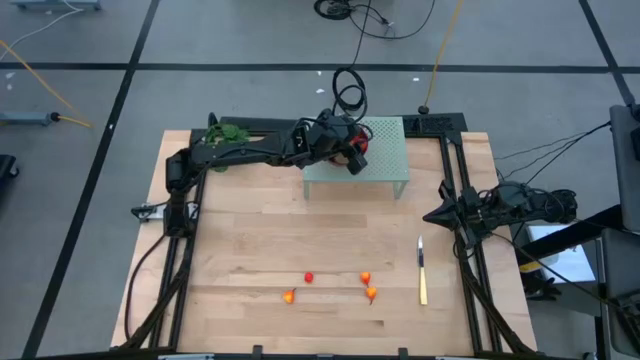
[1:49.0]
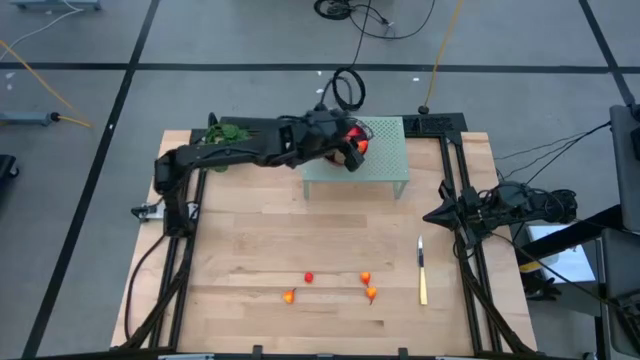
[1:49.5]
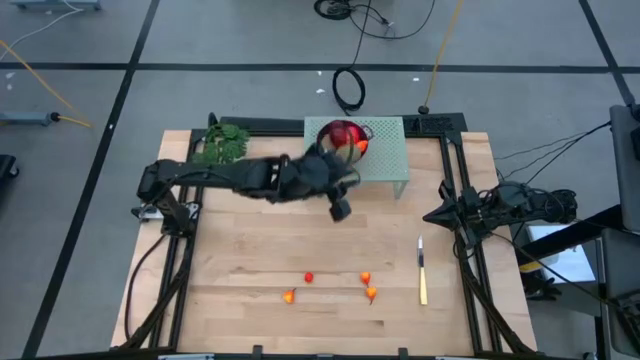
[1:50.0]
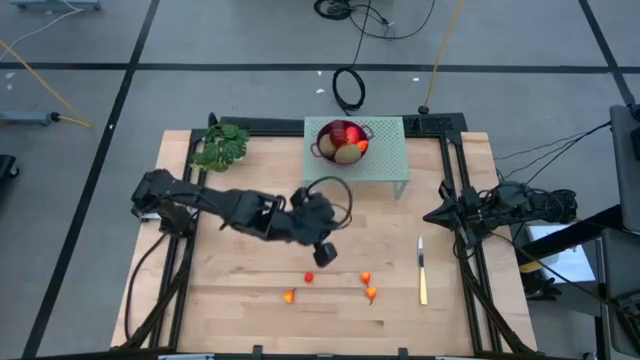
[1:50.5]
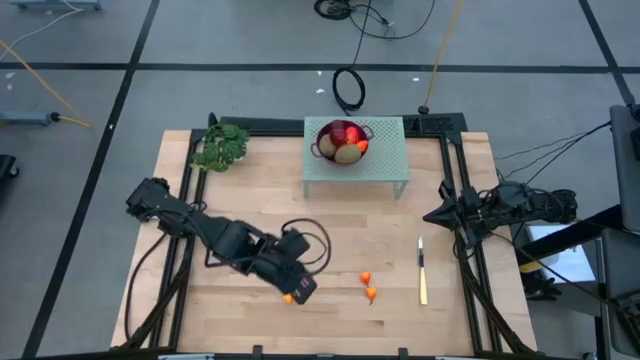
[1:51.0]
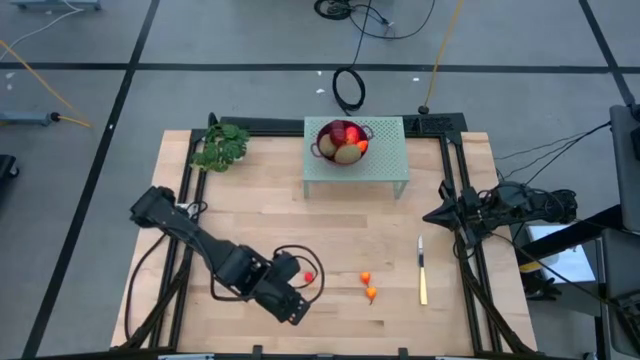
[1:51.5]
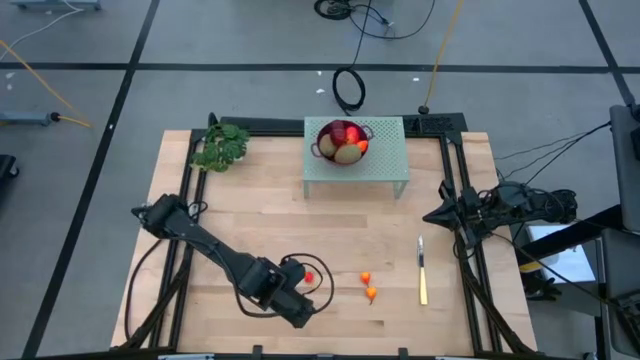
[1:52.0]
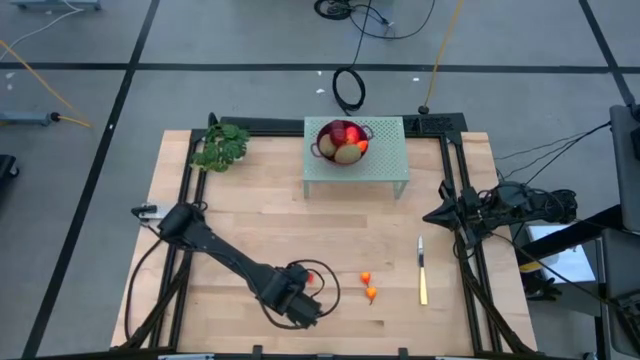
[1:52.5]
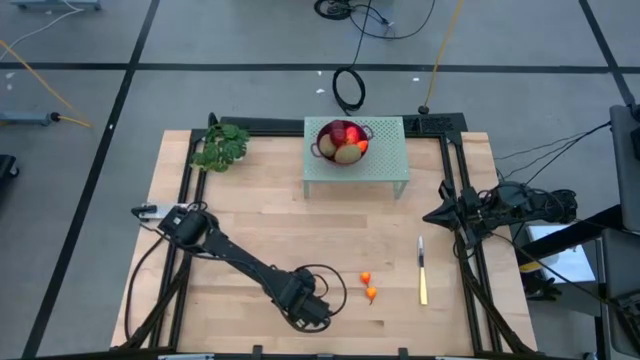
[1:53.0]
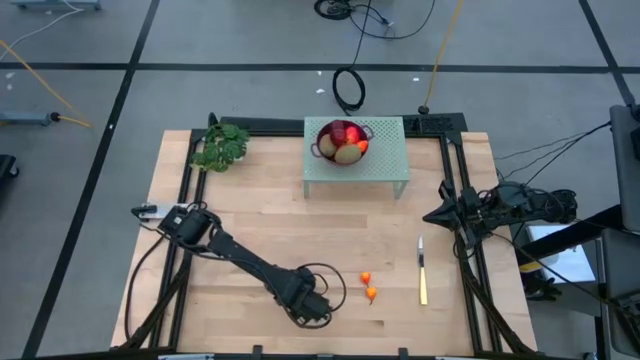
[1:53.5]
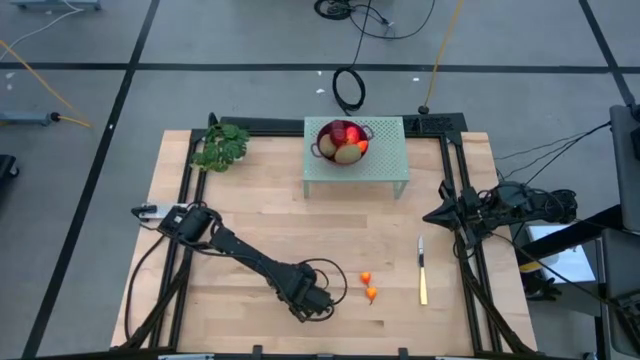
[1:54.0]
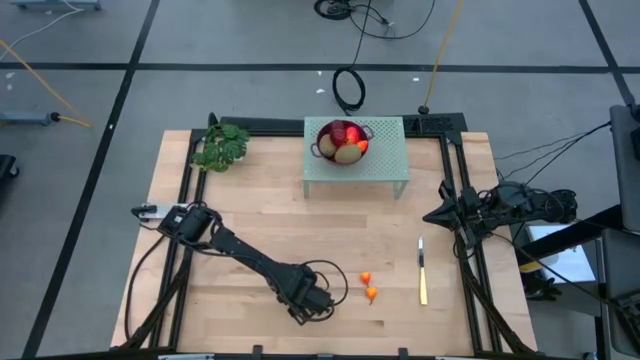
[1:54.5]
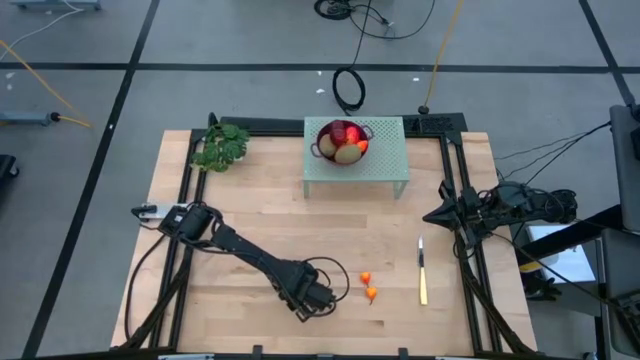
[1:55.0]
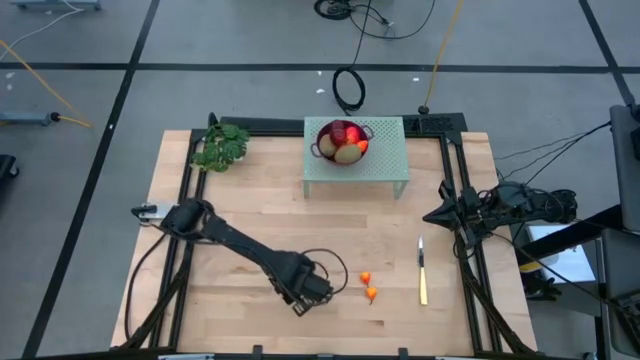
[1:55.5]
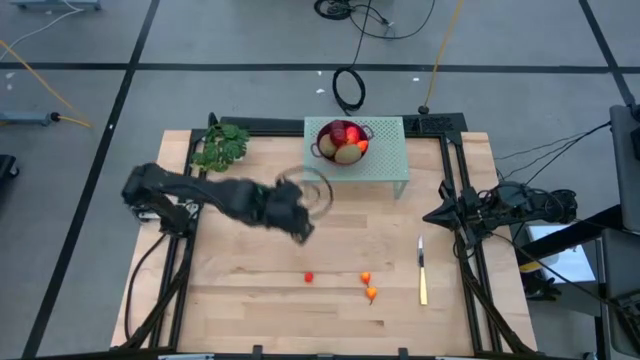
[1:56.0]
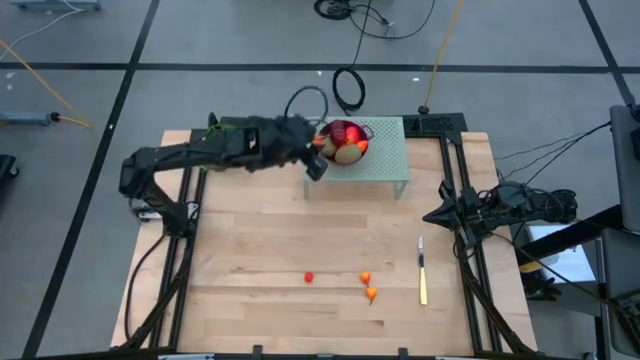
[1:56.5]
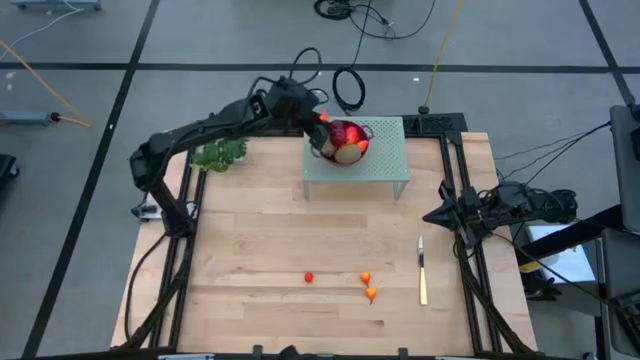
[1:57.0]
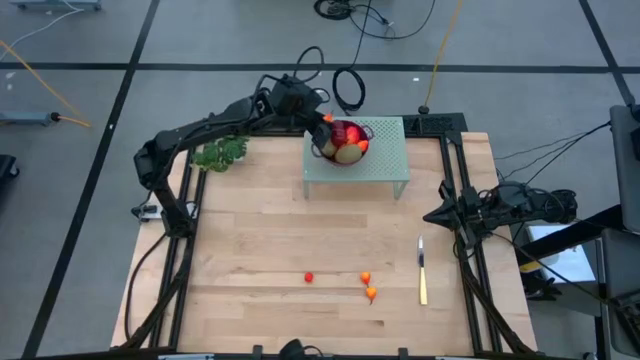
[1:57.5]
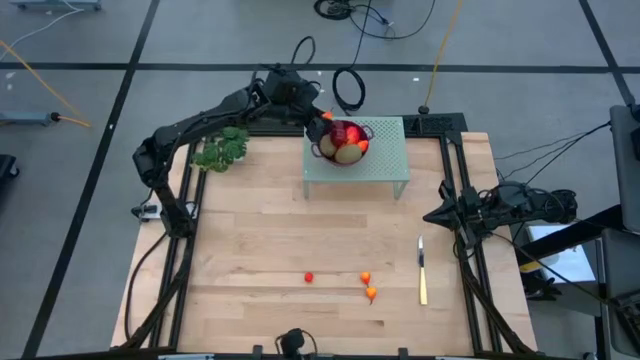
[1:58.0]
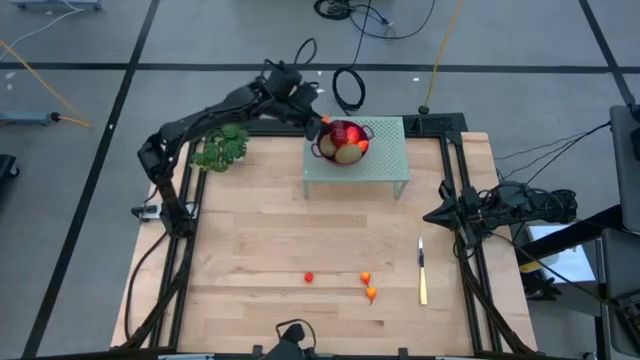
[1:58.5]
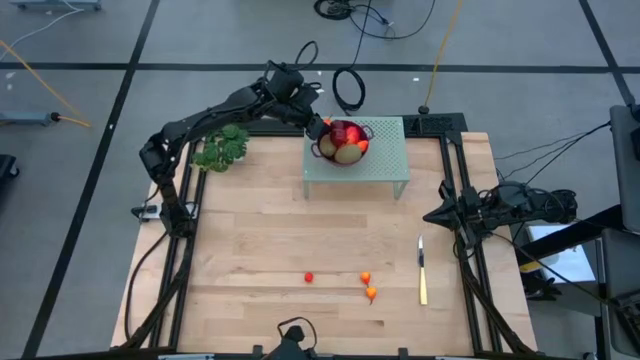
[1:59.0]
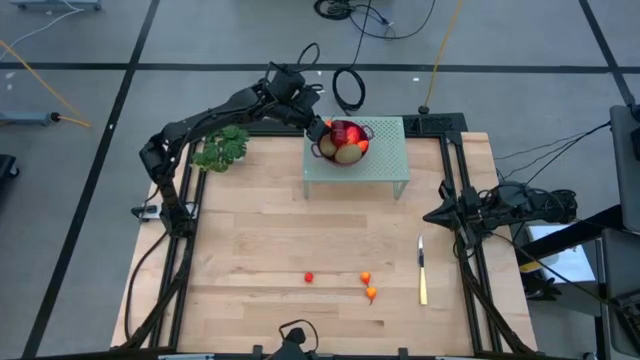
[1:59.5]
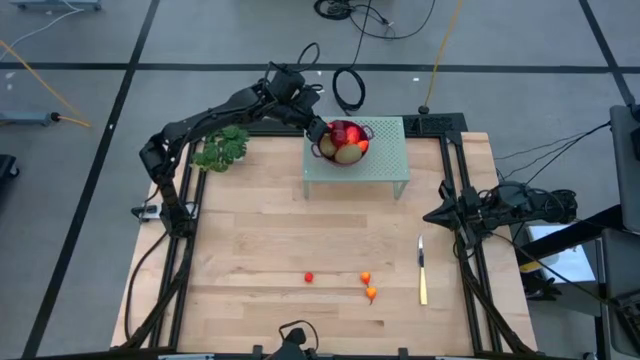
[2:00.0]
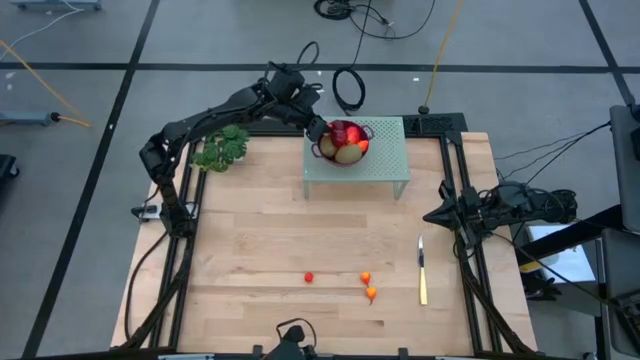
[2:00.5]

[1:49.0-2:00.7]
Task: Pick & Place Fruit
Put the pear into the strainer bowl

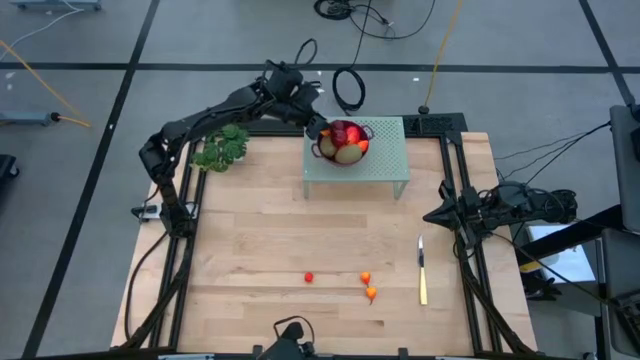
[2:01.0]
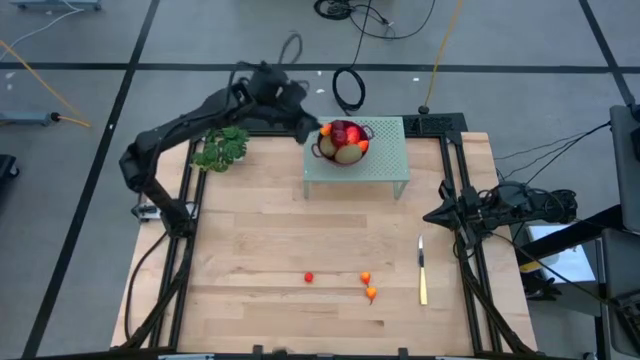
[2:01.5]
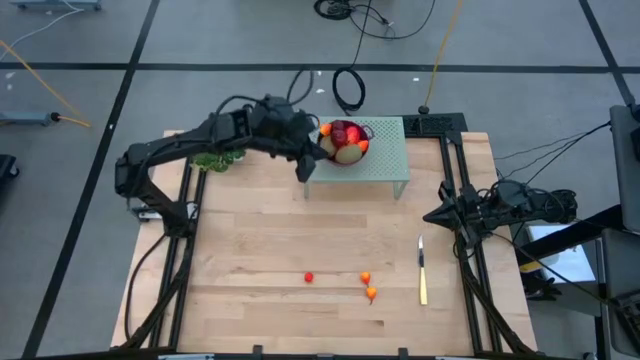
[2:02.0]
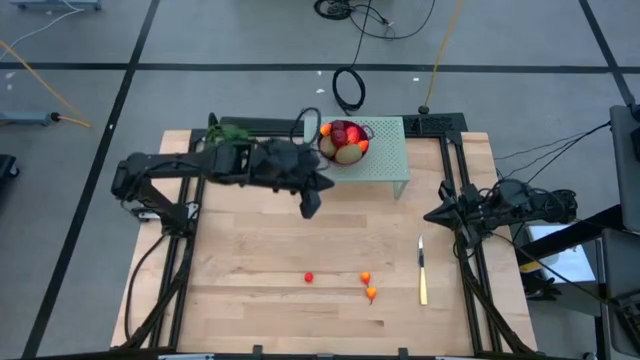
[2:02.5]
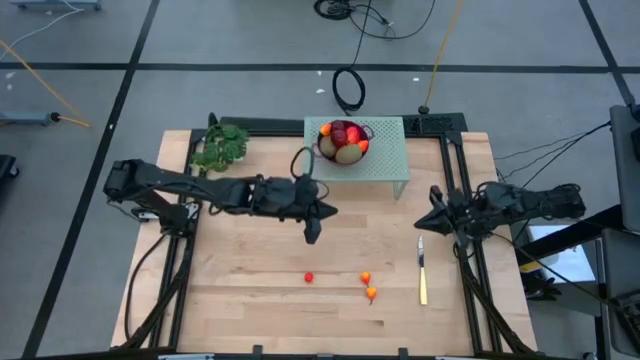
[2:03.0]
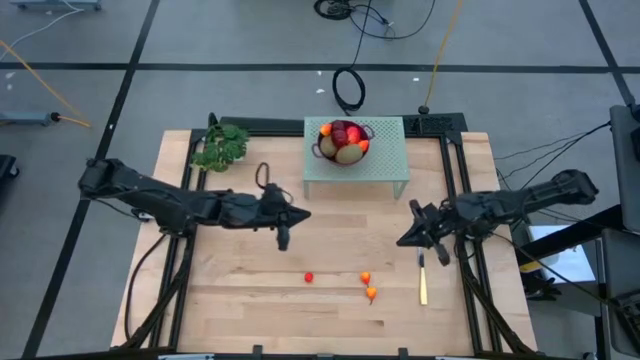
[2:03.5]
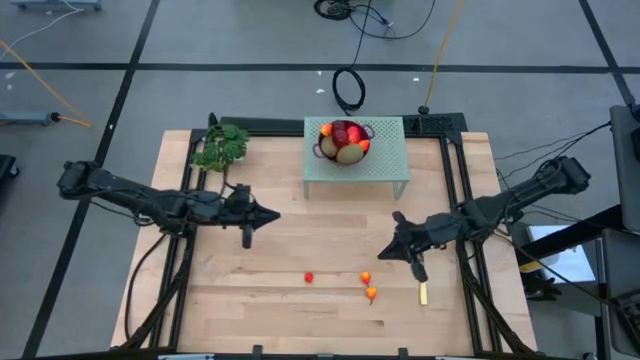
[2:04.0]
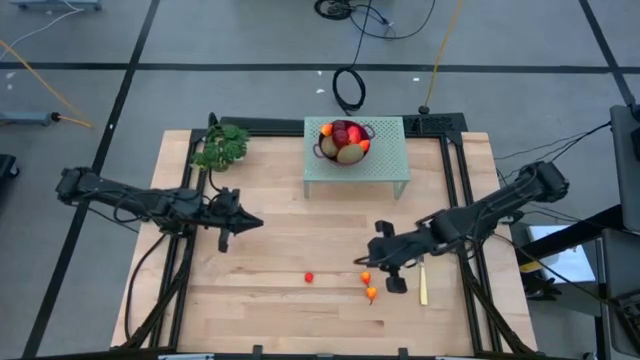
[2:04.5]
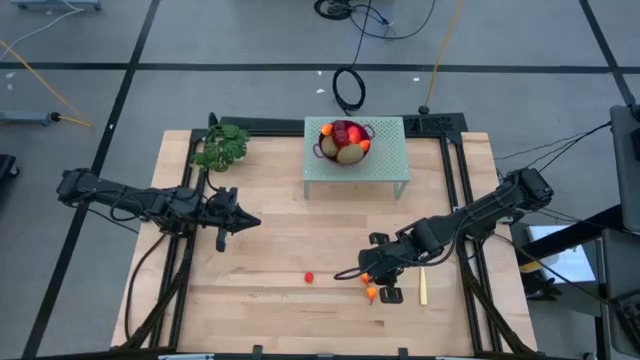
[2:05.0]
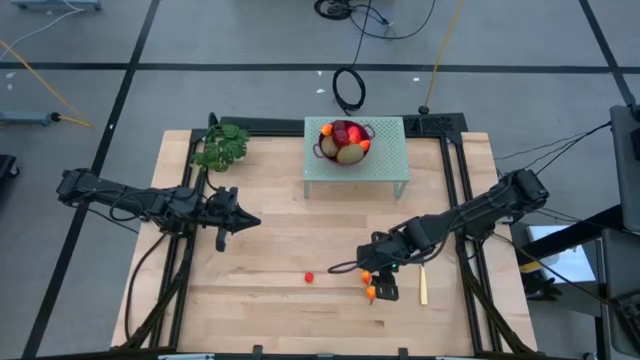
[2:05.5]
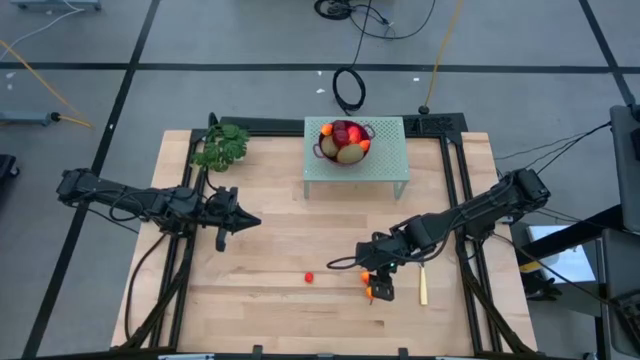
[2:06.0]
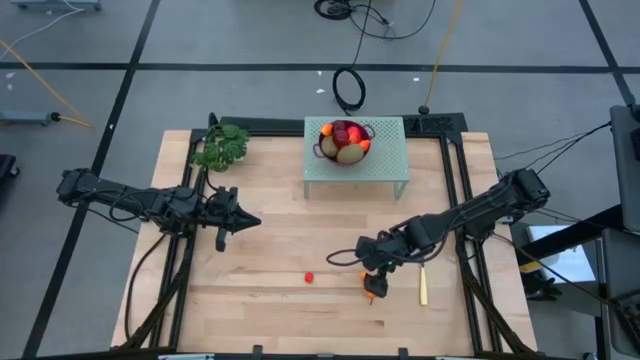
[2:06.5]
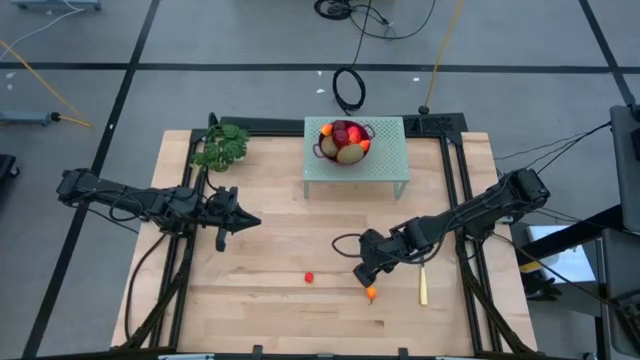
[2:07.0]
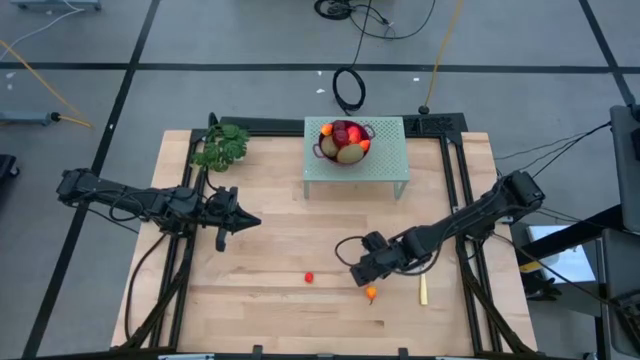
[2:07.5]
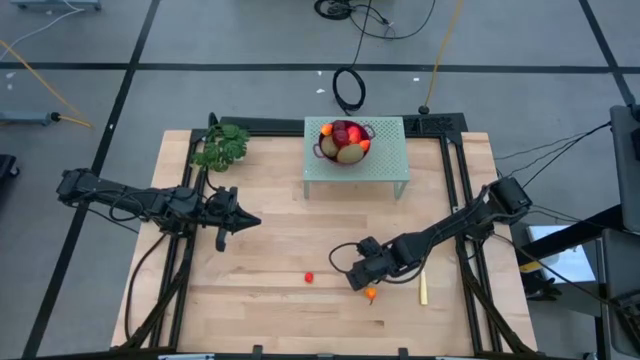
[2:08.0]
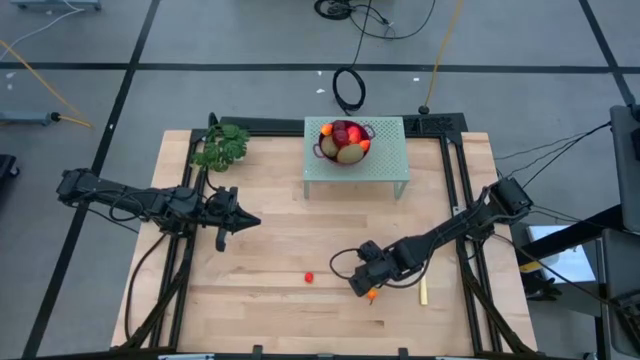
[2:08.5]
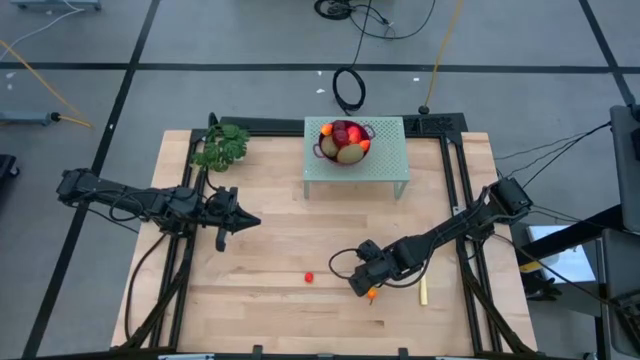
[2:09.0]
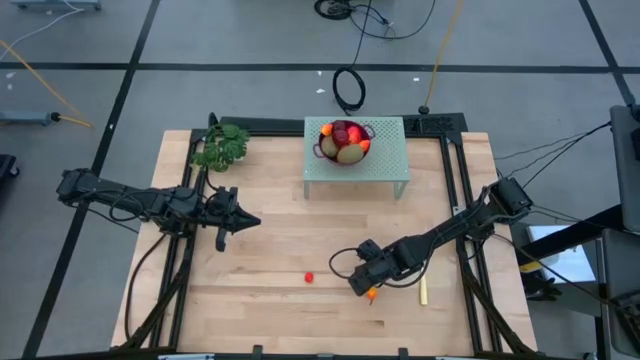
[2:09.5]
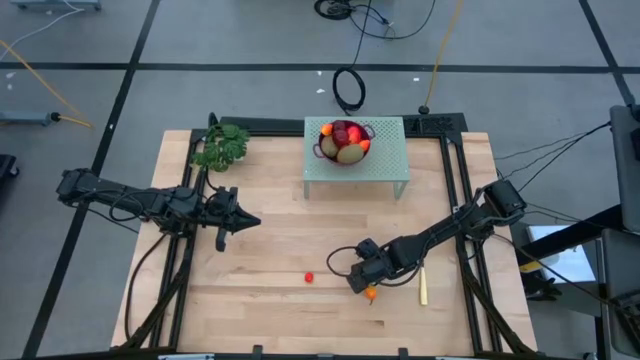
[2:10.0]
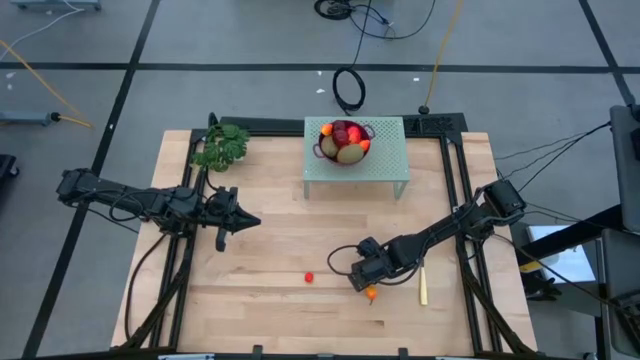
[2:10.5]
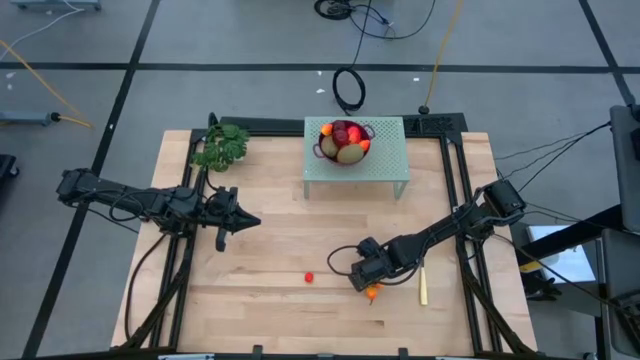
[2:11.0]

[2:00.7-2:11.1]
Put the pear into the strainer bowl
